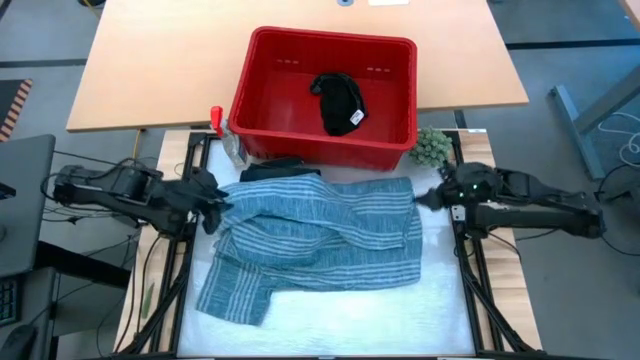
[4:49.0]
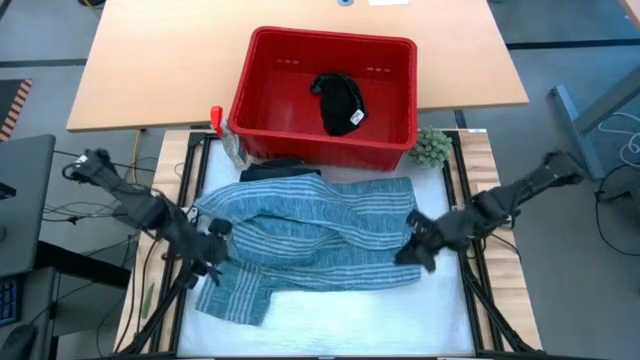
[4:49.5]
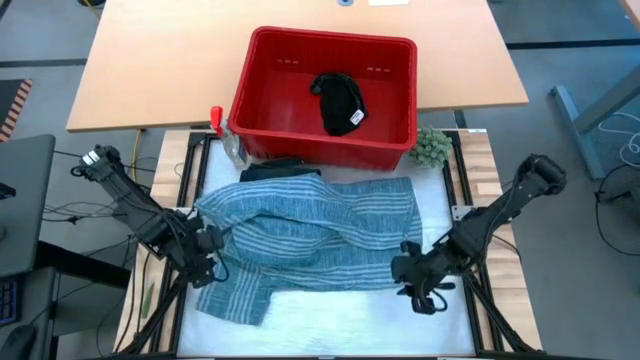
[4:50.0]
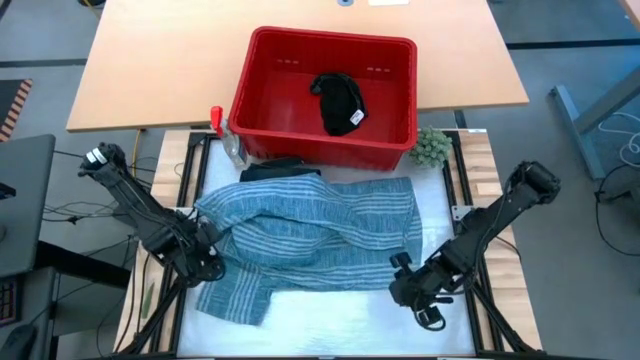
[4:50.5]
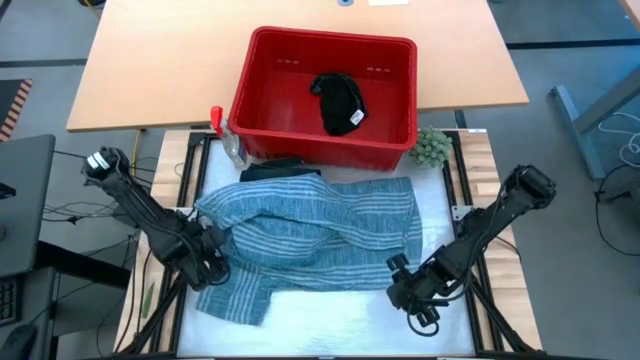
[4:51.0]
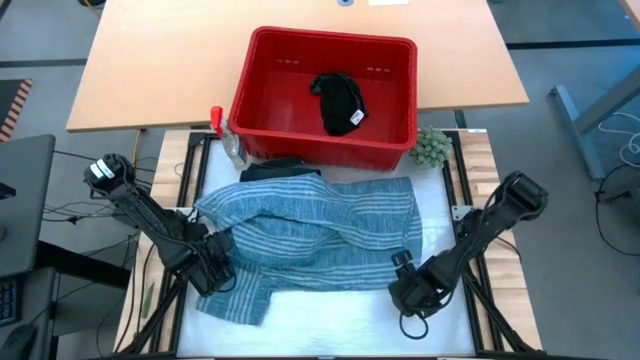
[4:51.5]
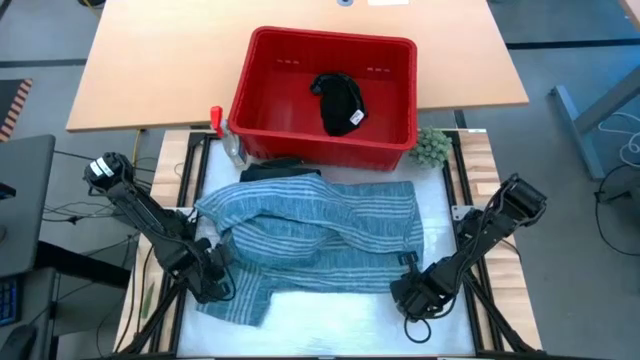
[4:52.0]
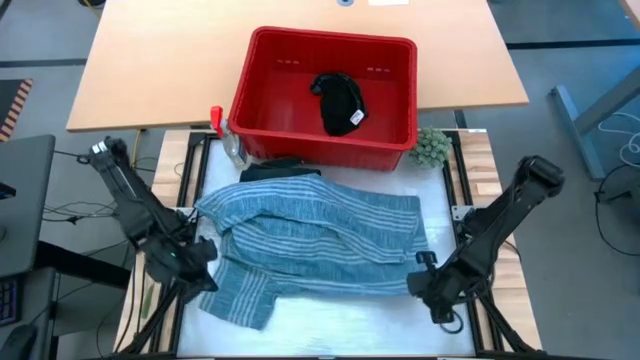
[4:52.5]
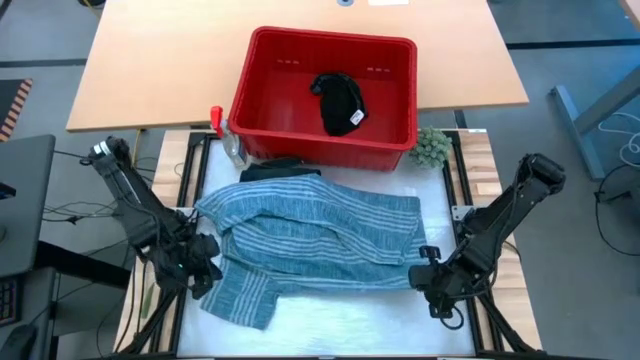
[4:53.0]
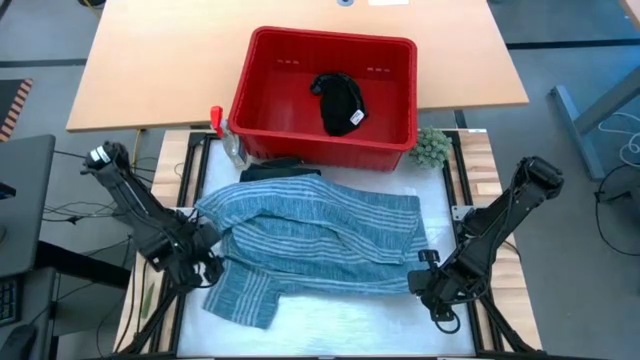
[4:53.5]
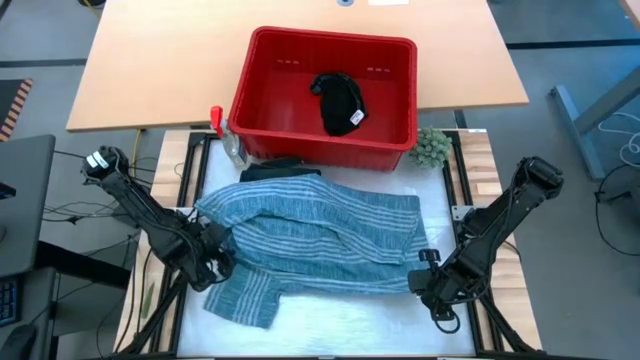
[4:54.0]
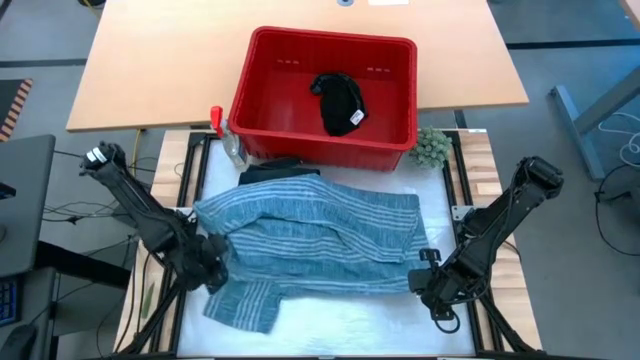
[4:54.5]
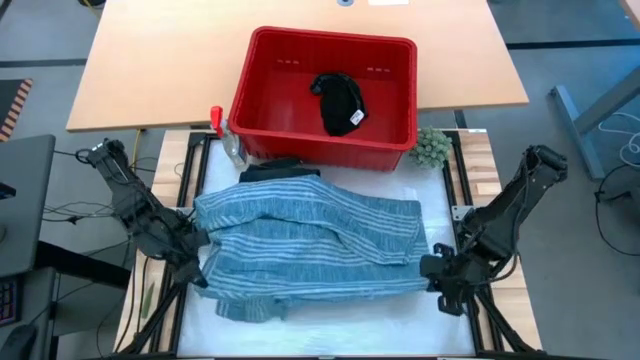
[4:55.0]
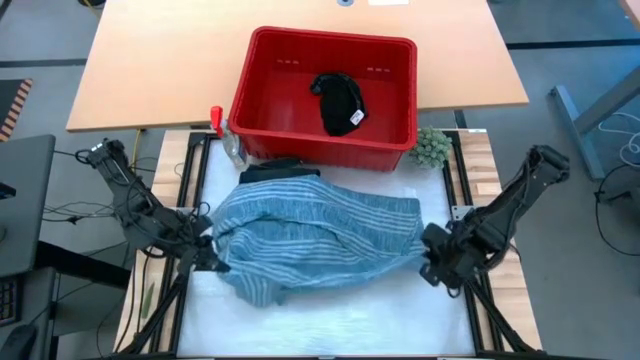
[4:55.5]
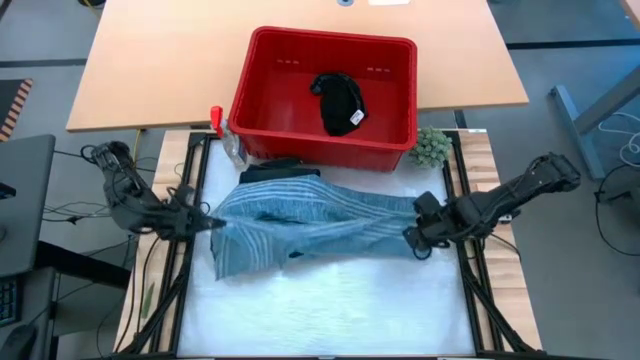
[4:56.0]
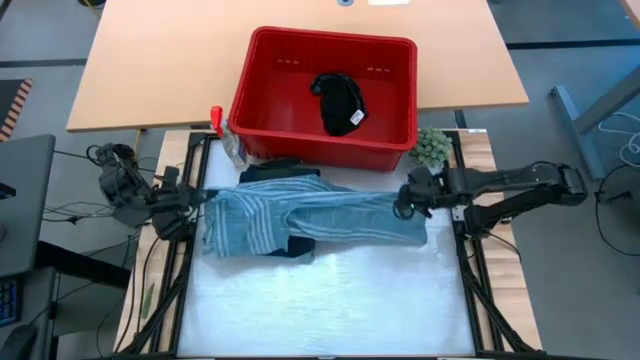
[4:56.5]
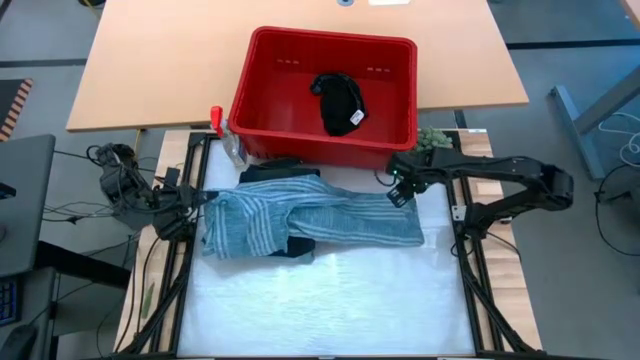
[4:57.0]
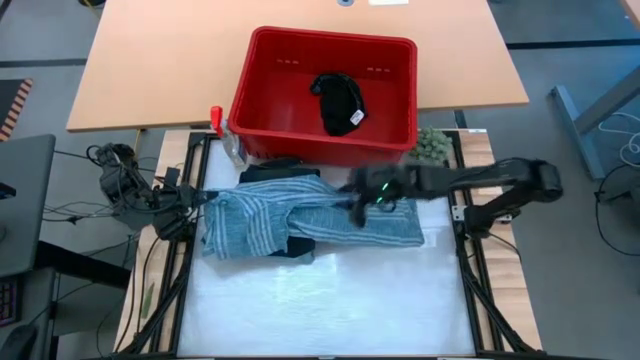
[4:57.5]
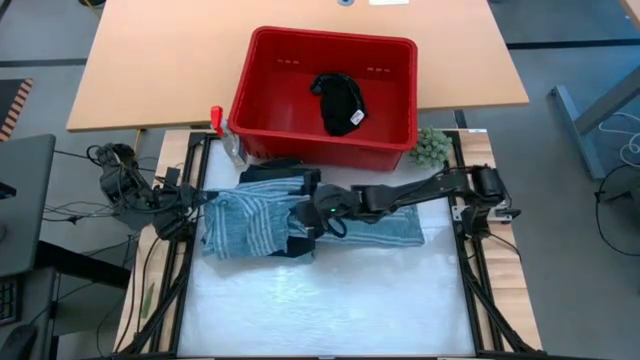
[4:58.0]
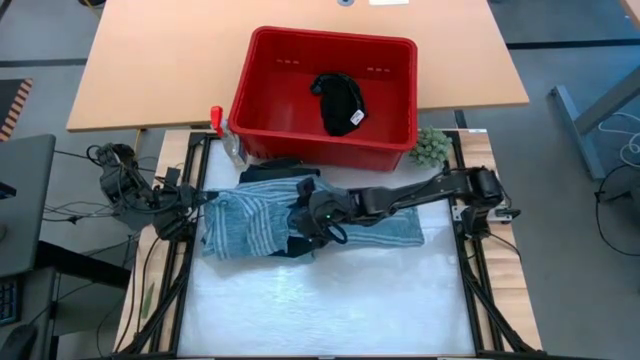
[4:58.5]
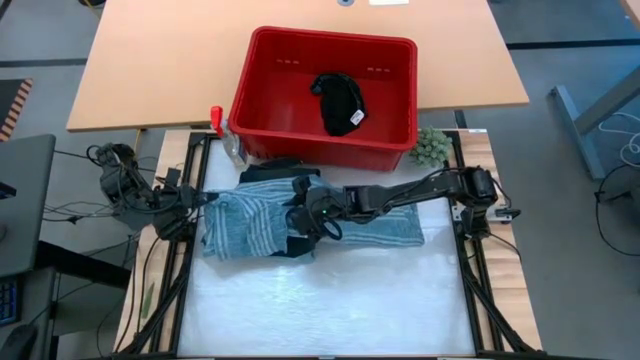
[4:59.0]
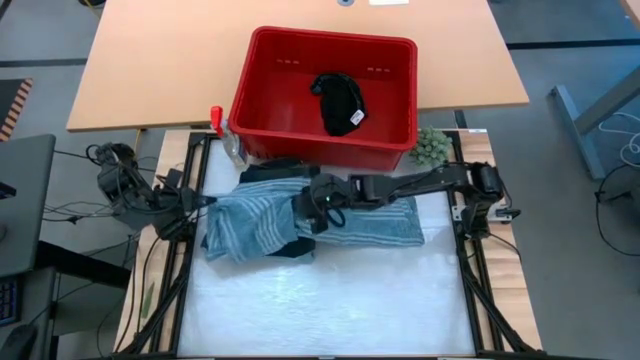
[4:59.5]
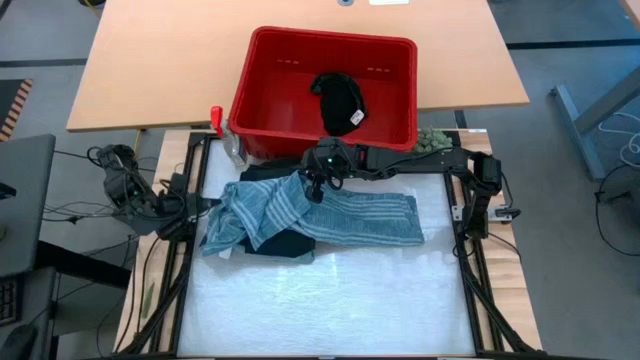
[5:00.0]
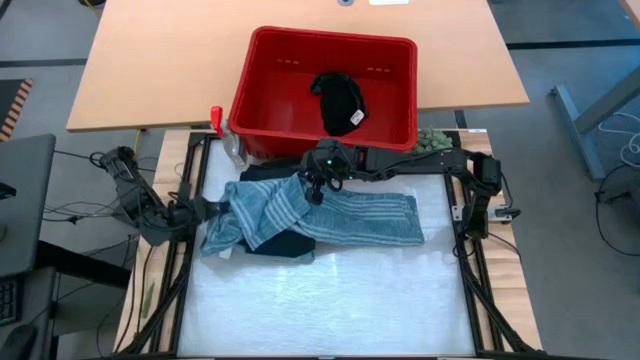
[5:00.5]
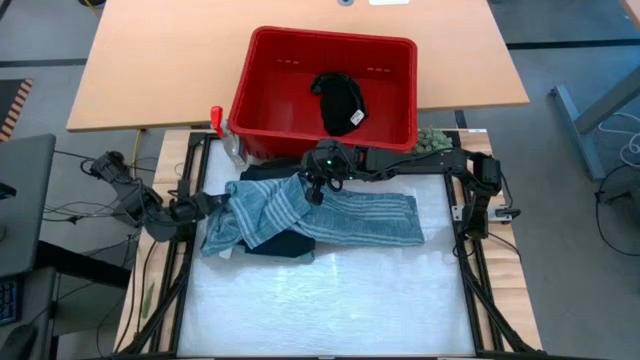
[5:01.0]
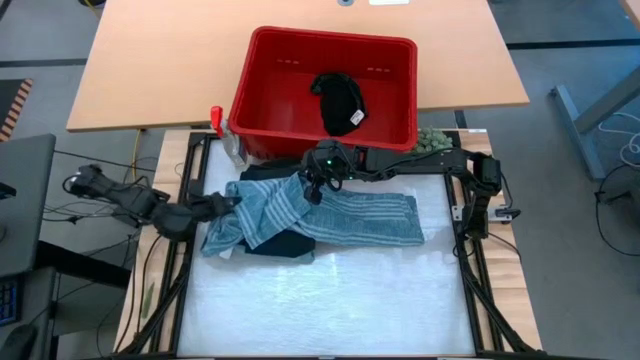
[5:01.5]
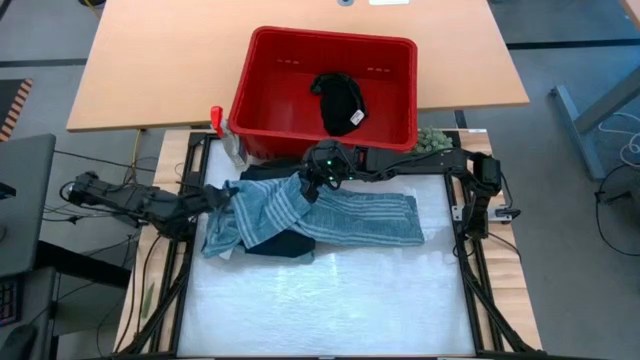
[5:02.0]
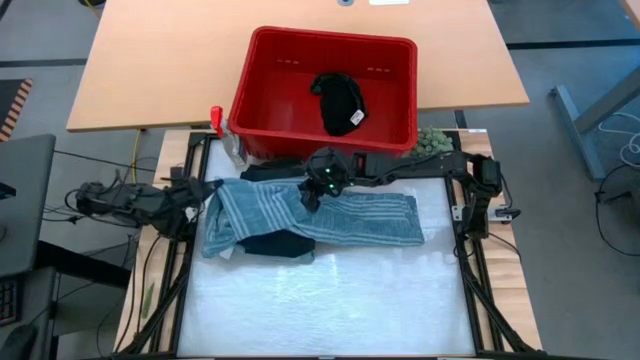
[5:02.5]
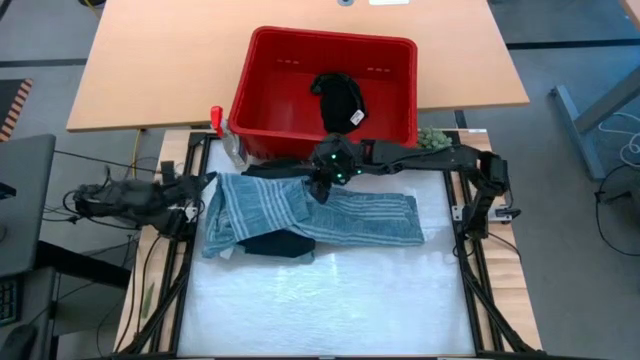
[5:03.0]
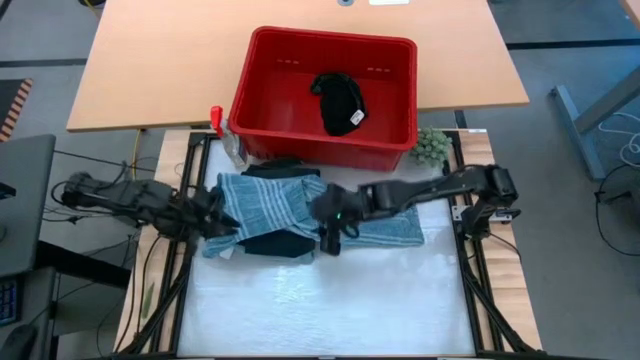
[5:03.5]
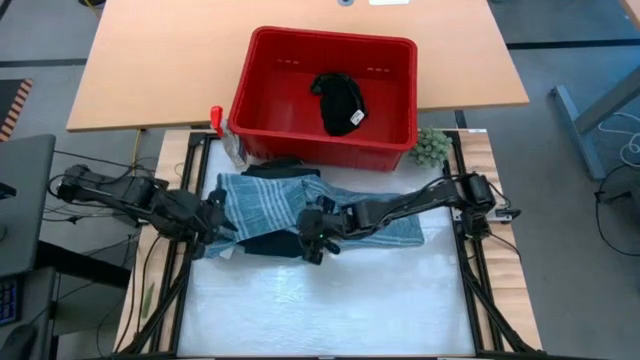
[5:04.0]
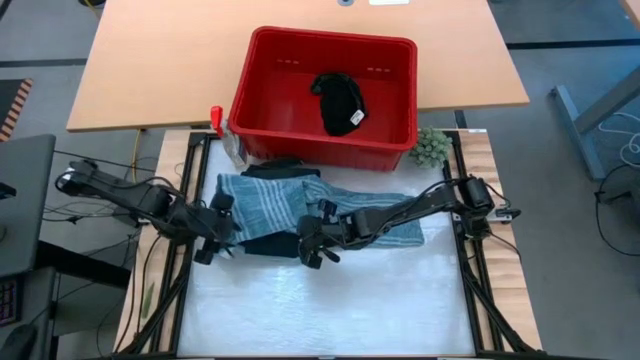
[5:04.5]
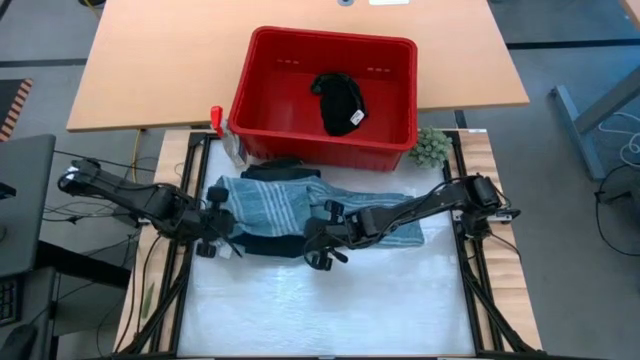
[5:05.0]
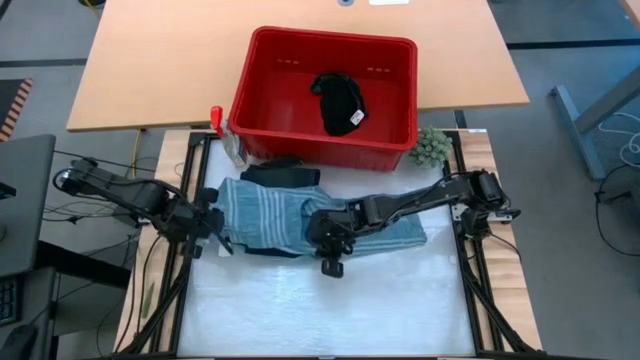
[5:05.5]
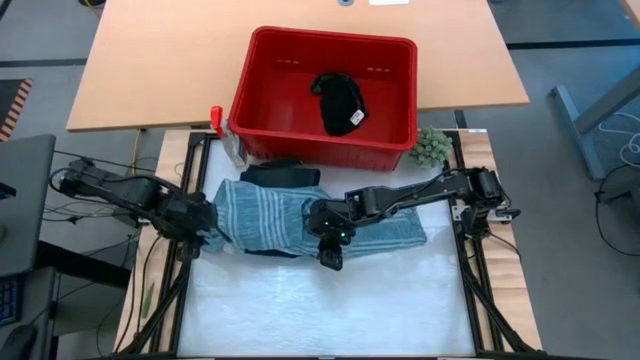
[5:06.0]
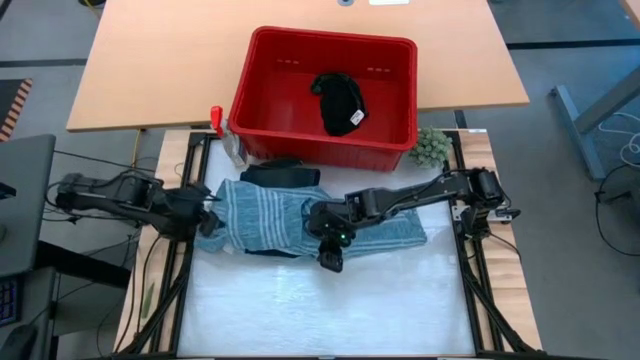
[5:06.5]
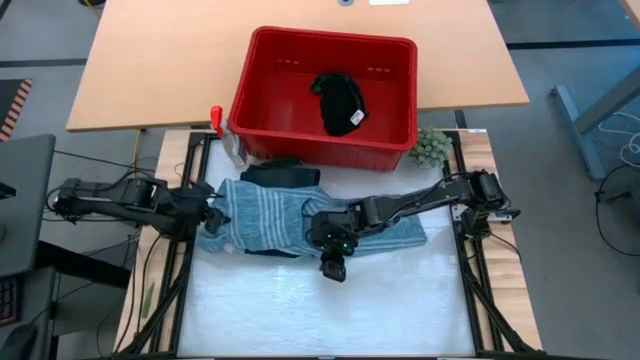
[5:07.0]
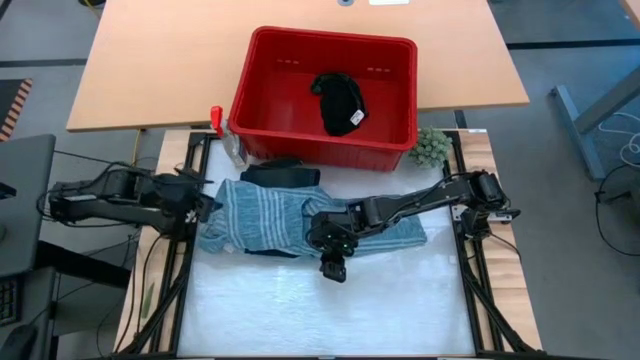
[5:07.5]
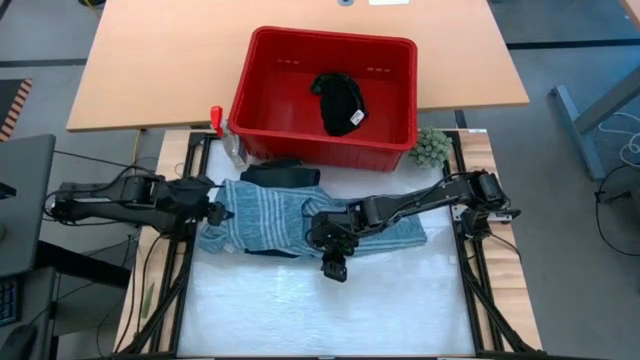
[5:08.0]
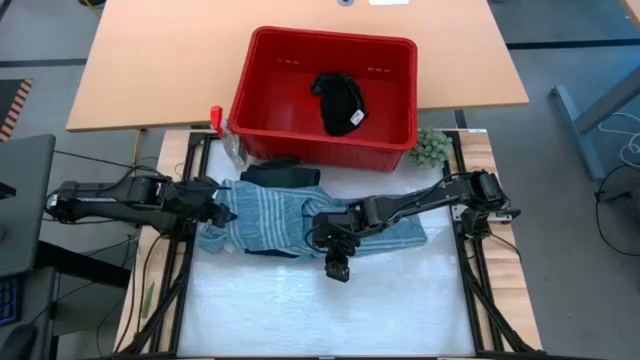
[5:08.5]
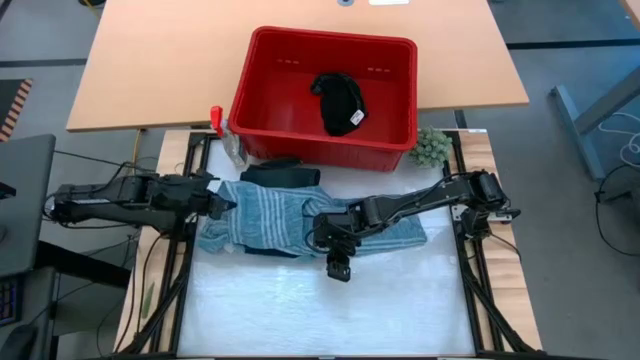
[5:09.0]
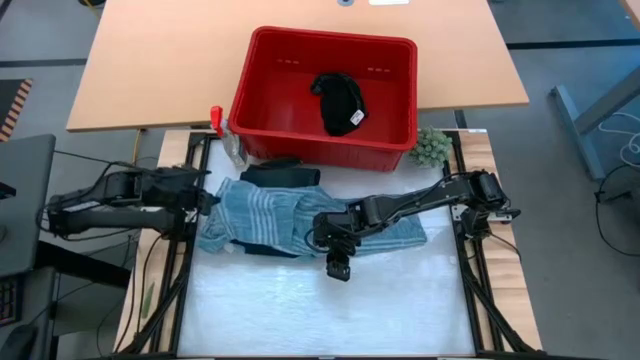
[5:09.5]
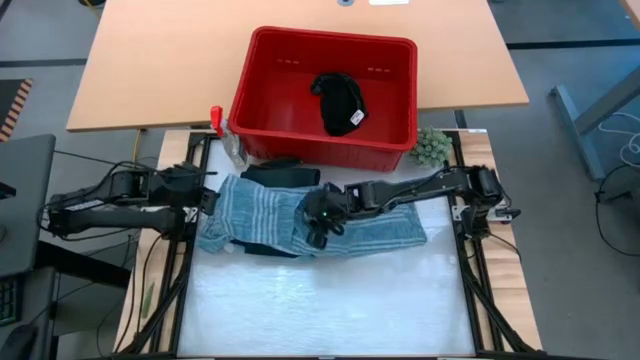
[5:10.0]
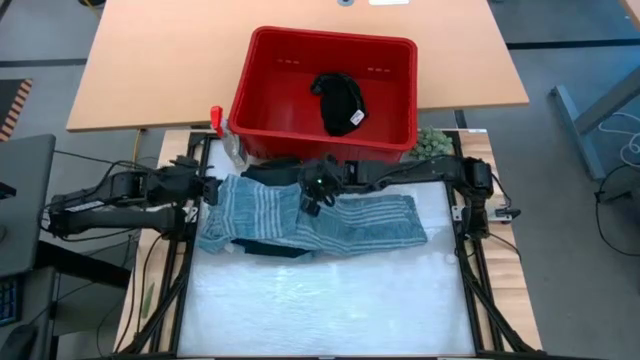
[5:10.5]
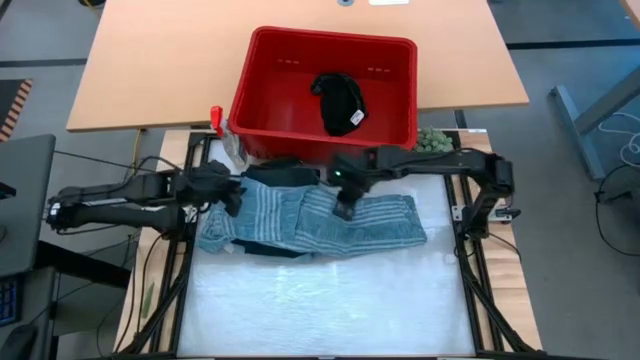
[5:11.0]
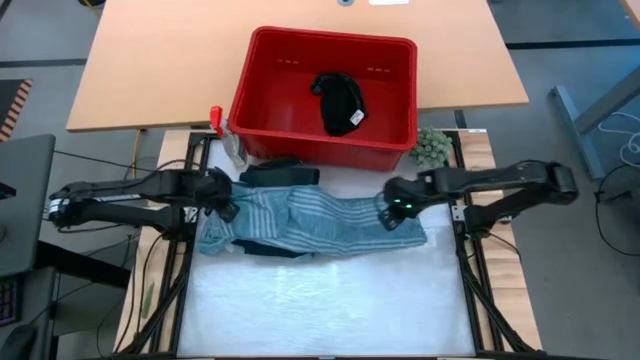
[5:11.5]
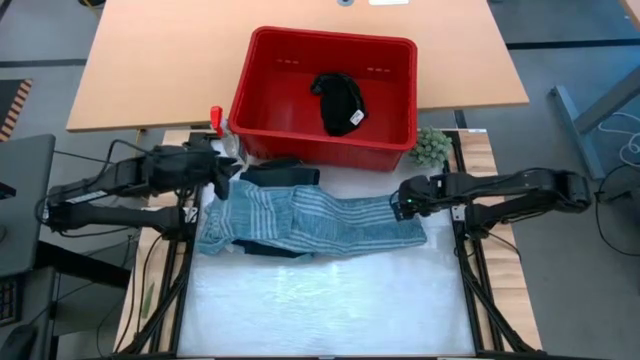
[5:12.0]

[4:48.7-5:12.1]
Task: Fold laundry
Fold the blue shirt from the red laundry bin
